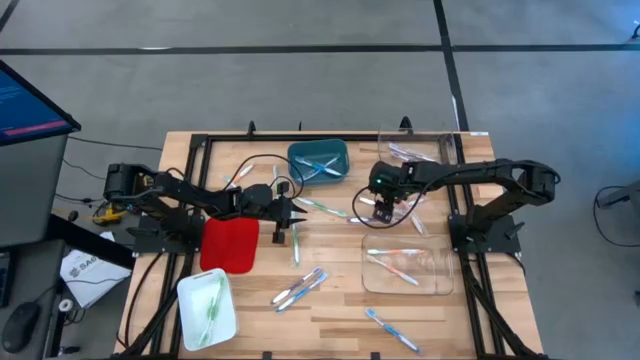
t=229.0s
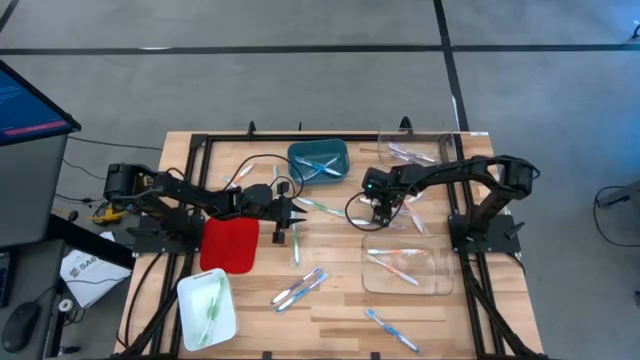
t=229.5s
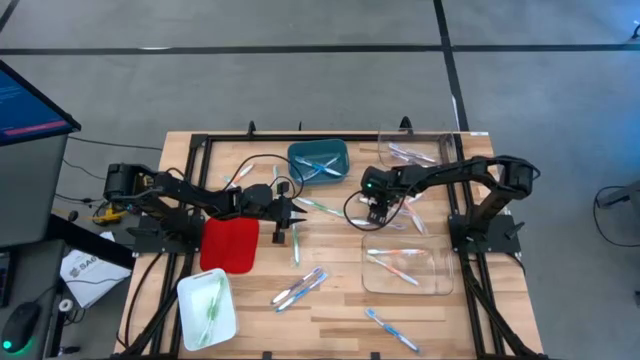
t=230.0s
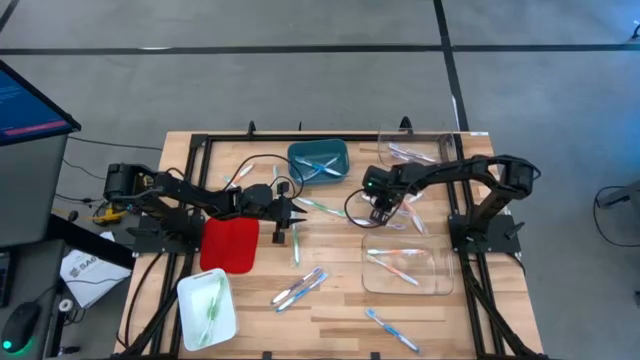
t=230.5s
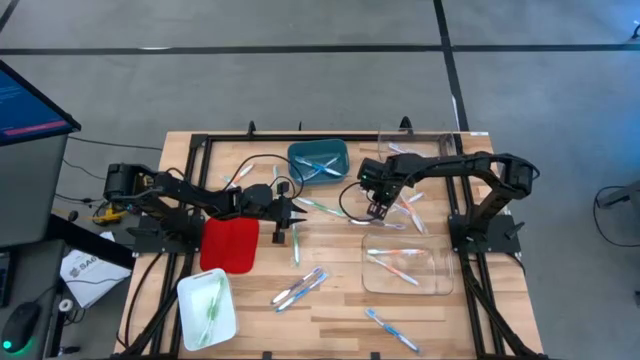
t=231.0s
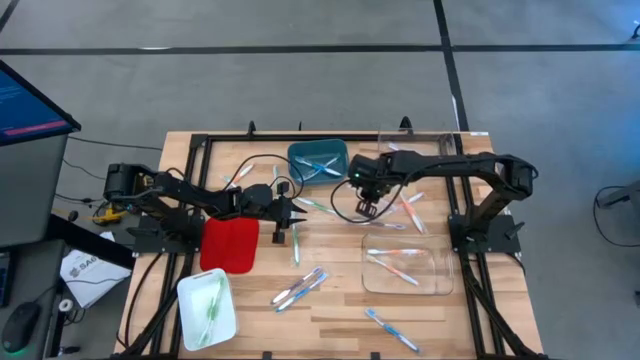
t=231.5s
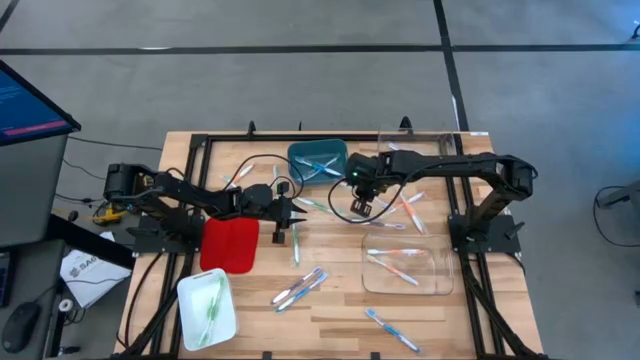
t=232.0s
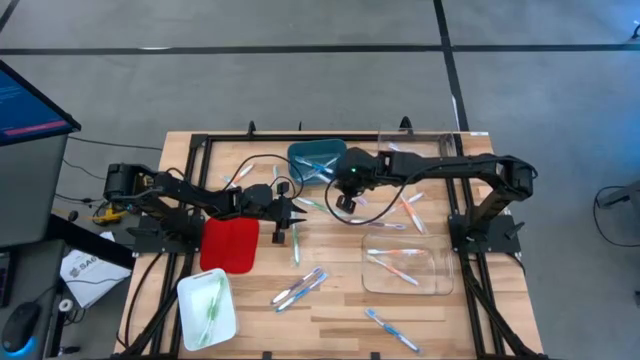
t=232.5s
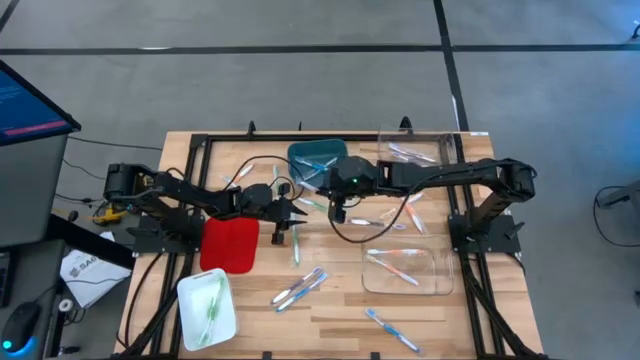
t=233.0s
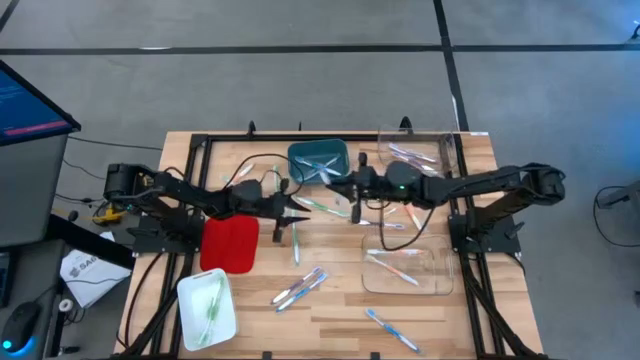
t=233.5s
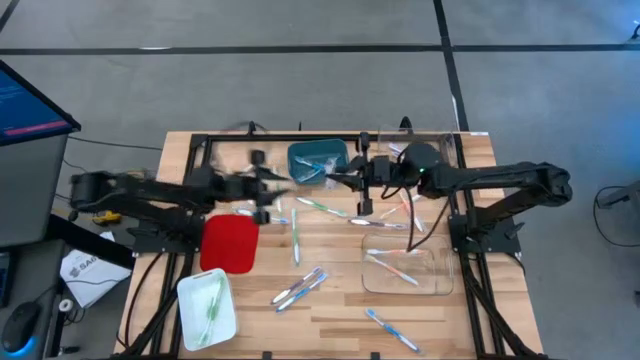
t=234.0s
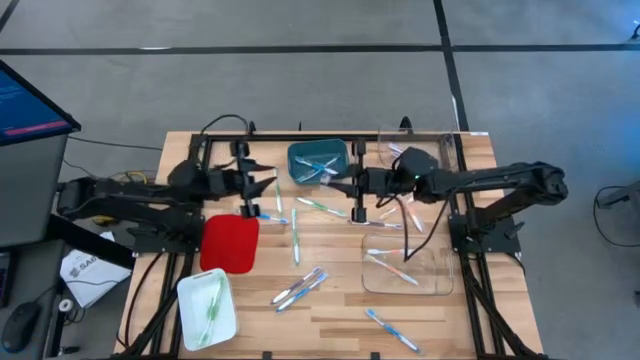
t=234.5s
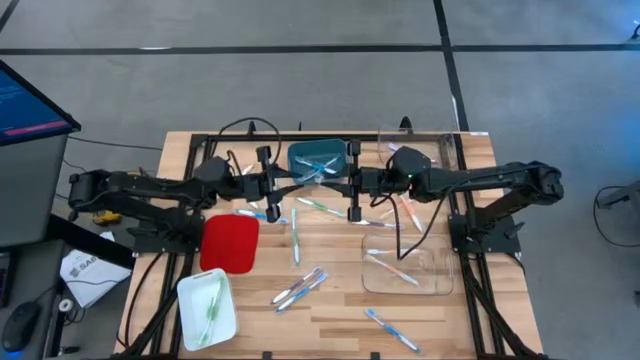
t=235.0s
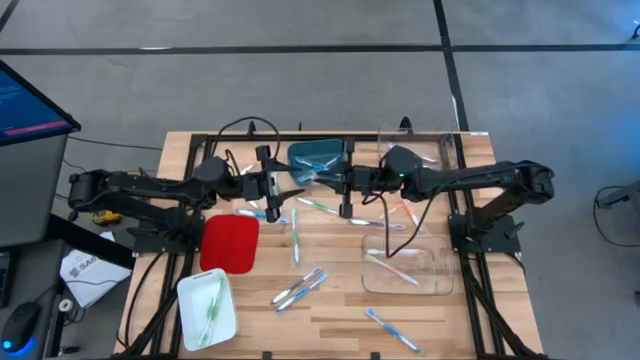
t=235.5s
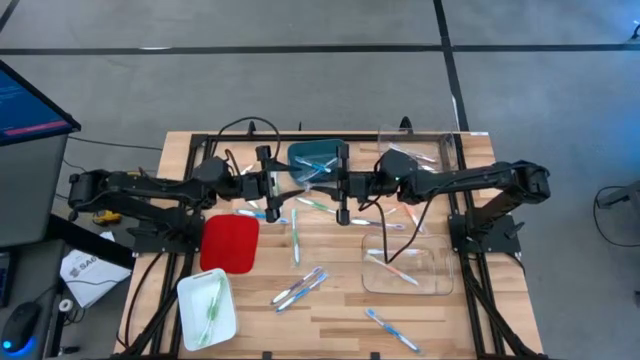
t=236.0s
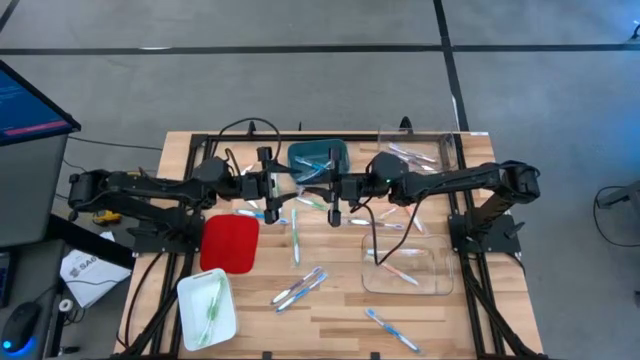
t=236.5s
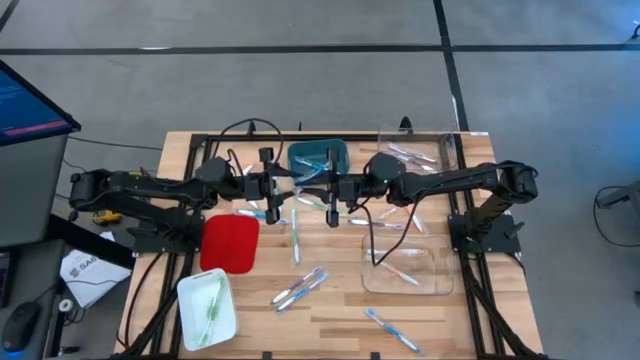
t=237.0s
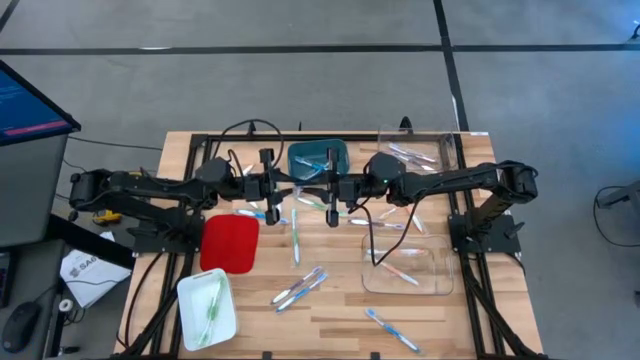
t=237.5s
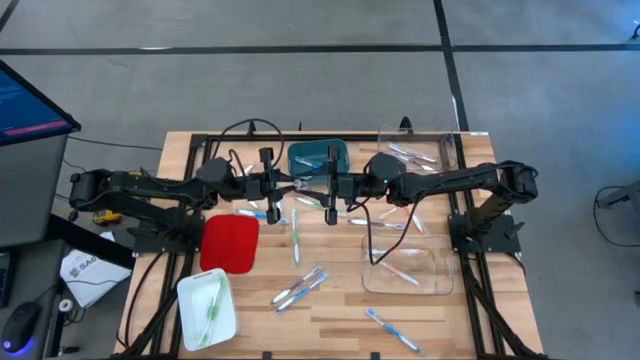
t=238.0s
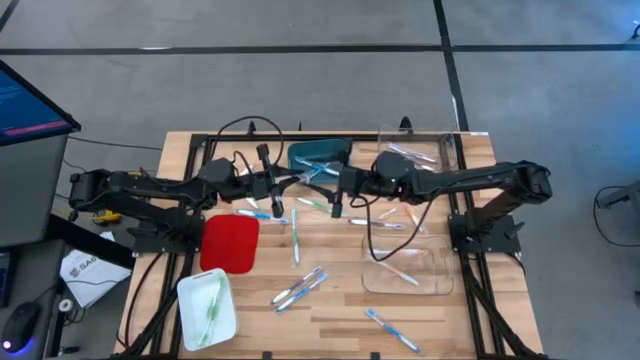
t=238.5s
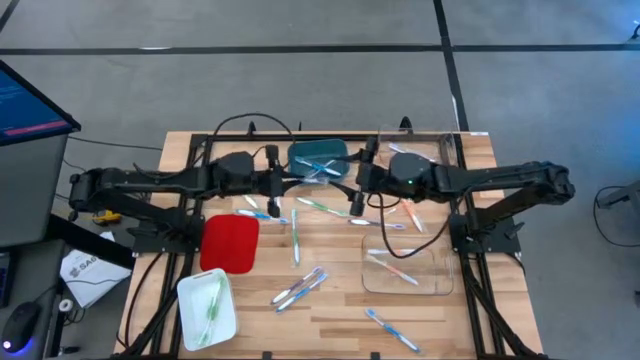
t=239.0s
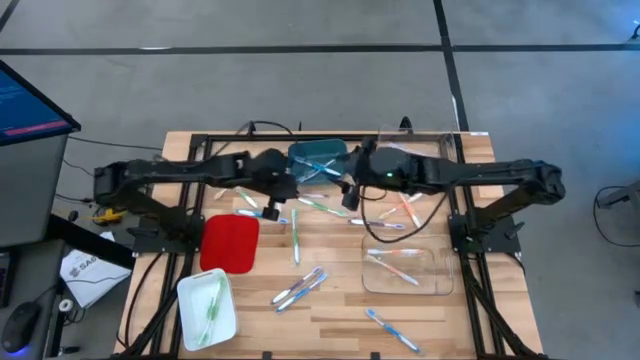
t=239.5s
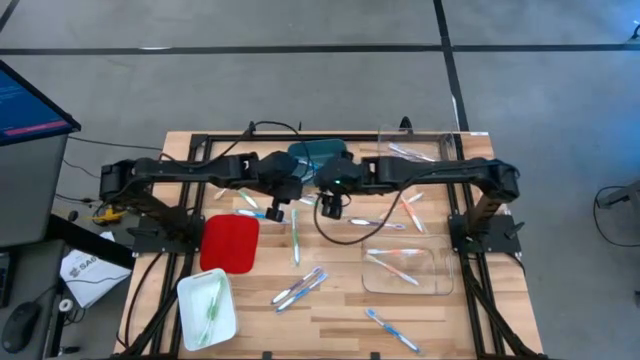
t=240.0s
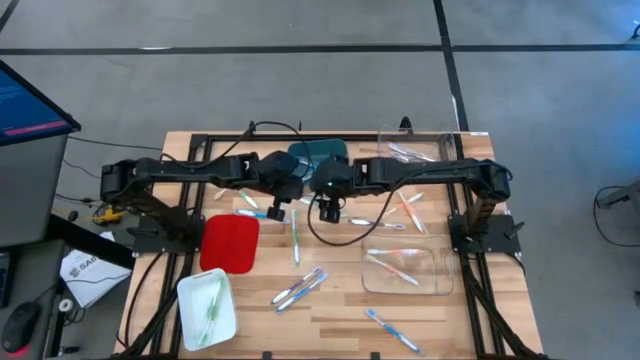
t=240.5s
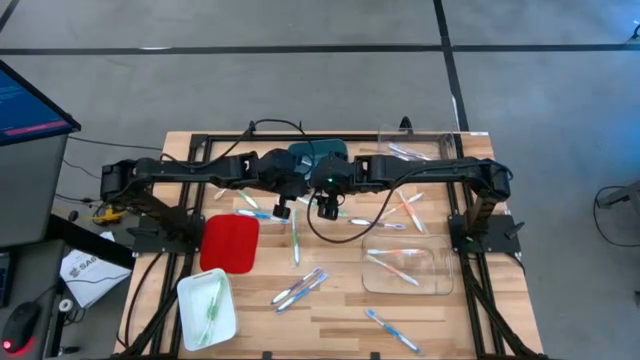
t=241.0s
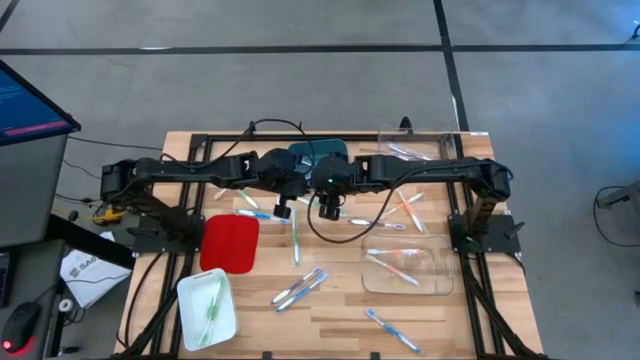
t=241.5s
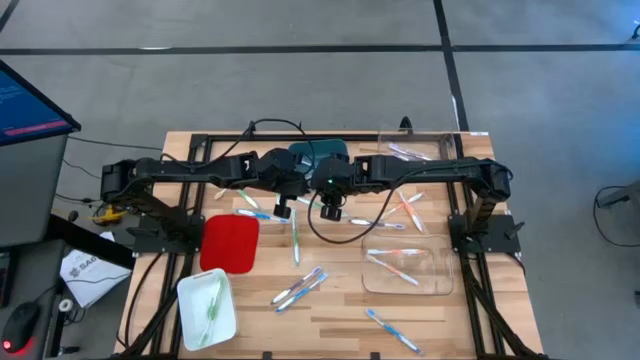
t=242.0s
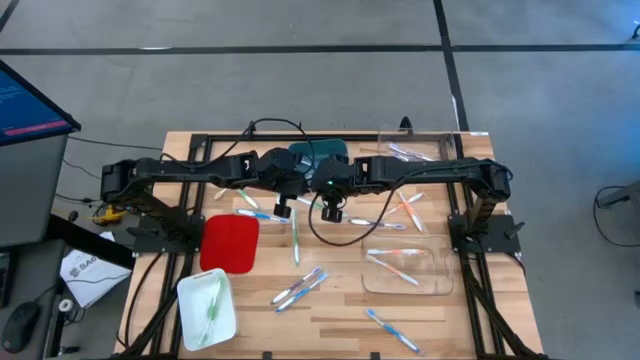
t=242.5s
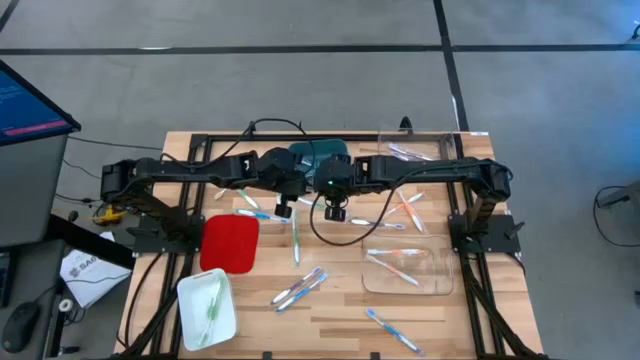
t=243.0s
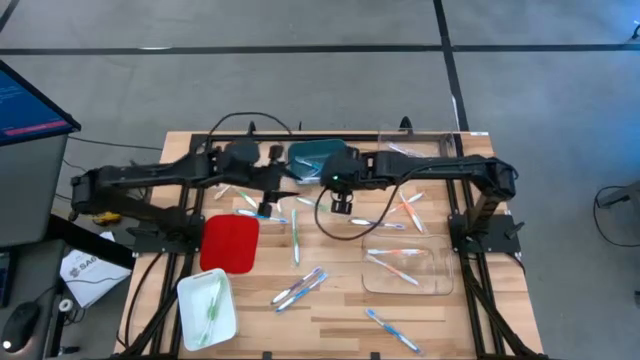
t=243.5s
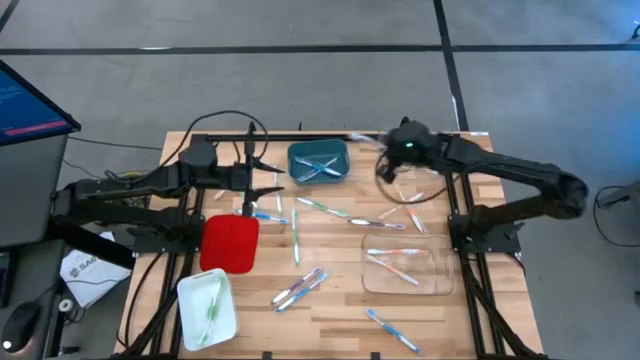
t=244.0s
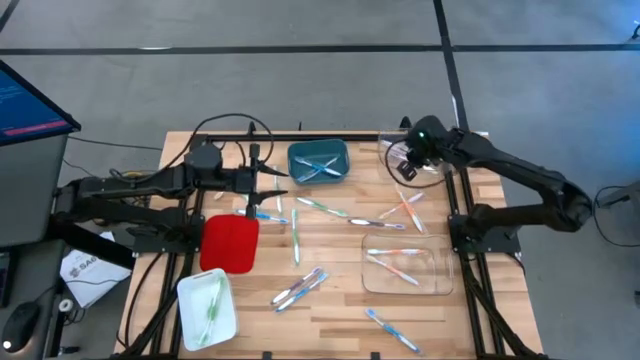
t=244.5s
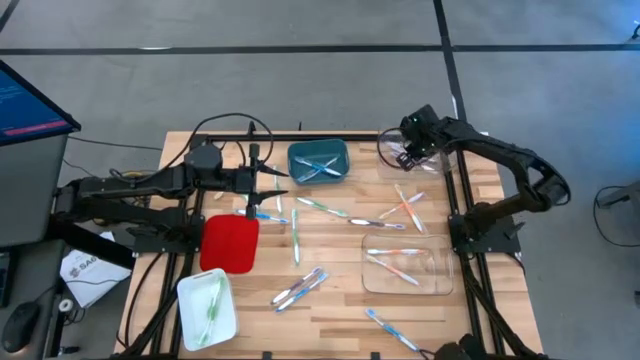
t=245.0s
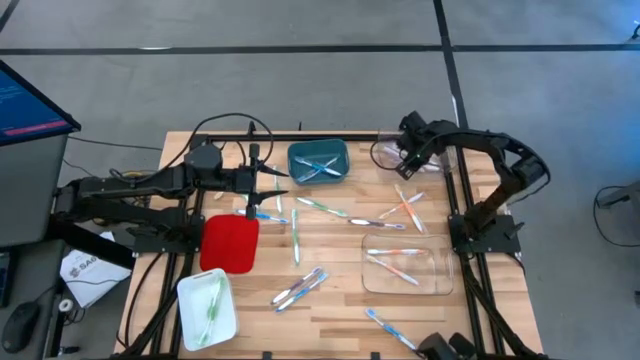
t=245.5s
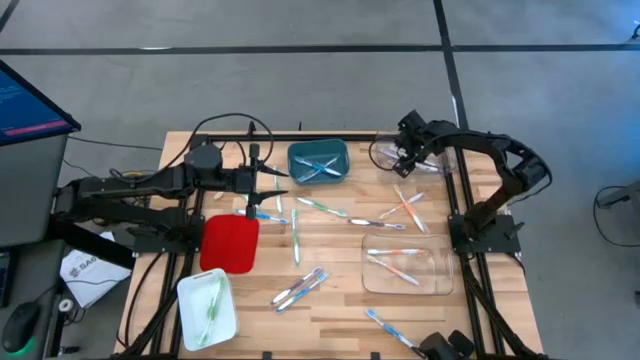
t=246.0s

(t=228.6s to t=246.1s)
Task: Pick & Place Toothbrushes
Put the purple toothbrush into the top transparent bin

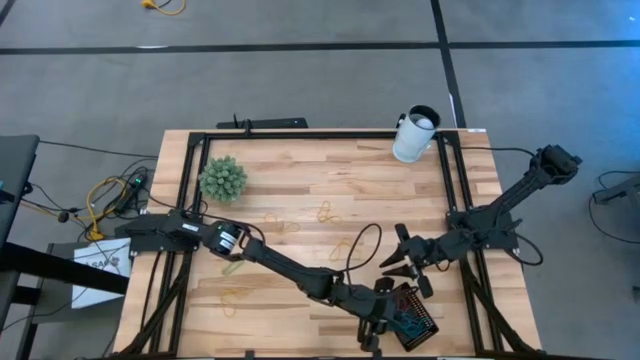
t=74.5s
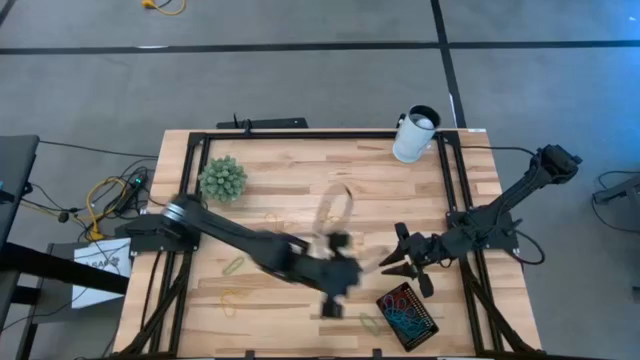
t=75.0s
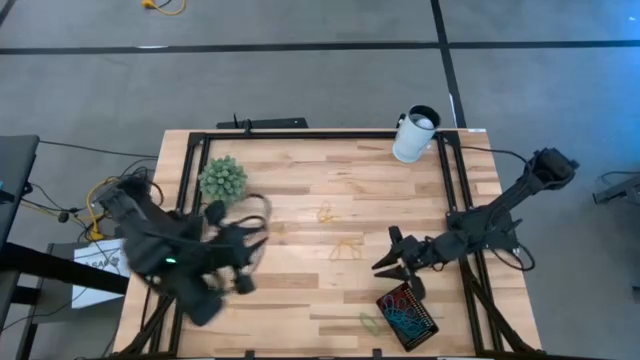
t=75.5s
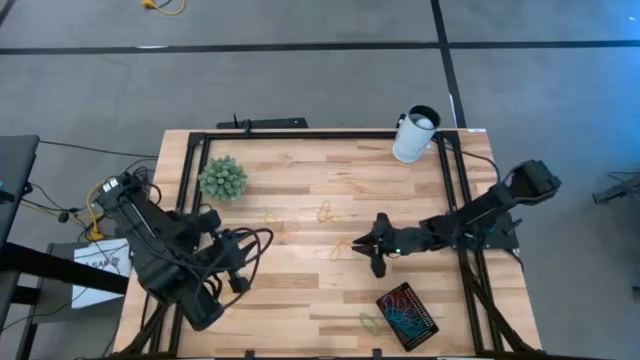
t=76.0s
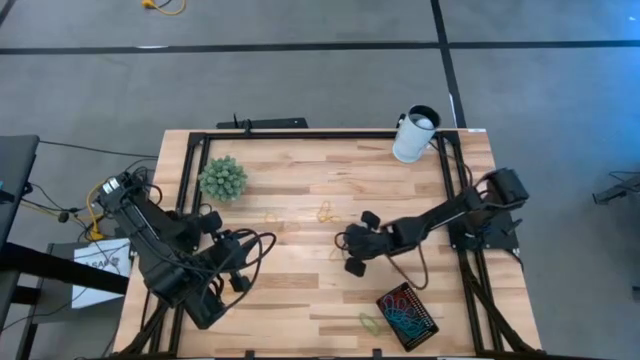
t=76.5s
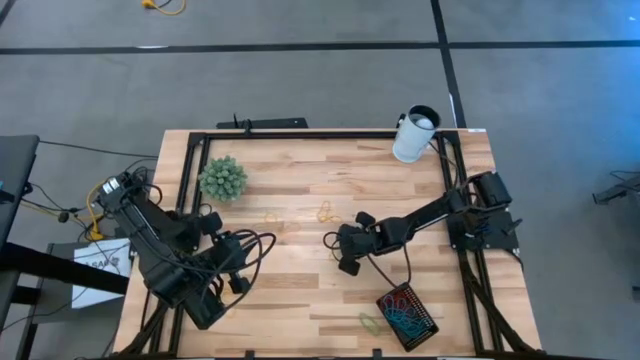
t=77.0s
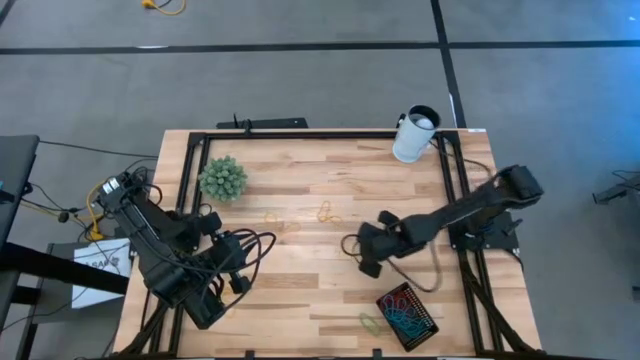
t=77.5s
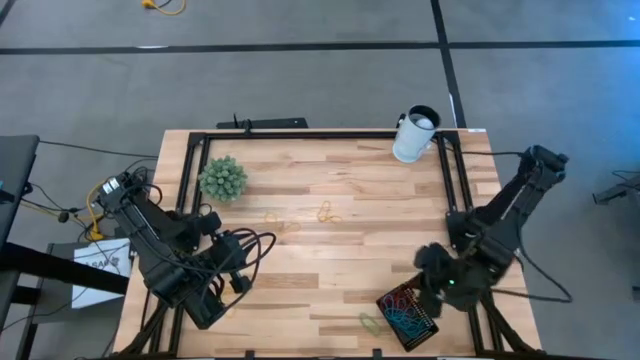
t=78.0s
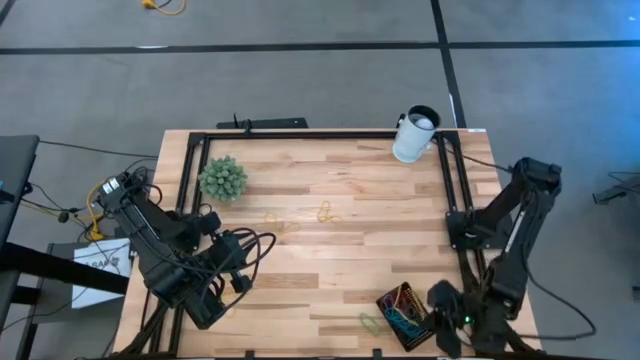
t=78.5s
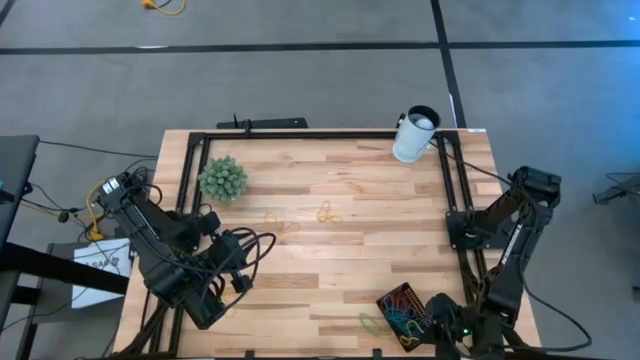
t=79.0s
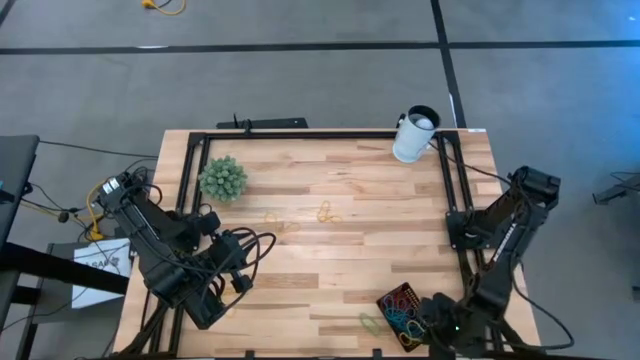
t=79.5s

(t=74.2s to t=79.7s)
Task: Pick and place rubber bands into bin
Put the yellow rubber band into the black basket
